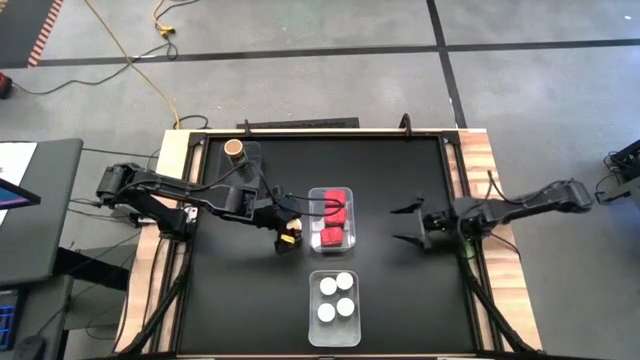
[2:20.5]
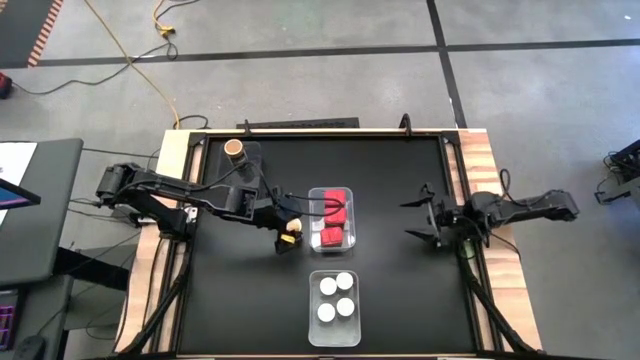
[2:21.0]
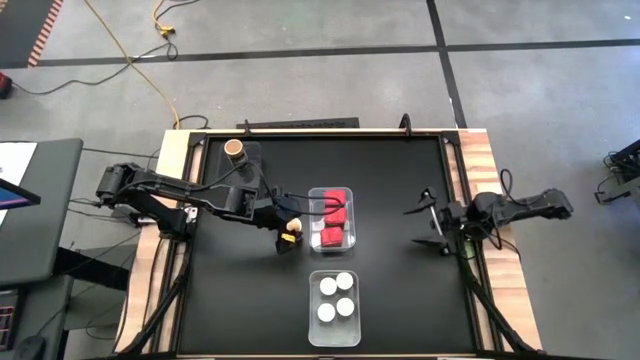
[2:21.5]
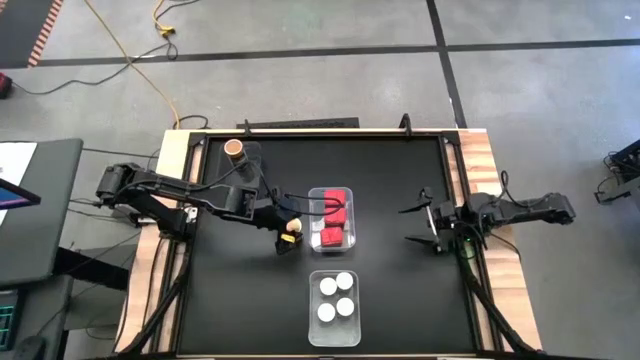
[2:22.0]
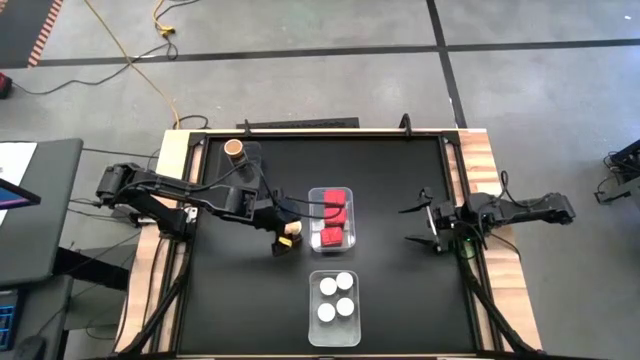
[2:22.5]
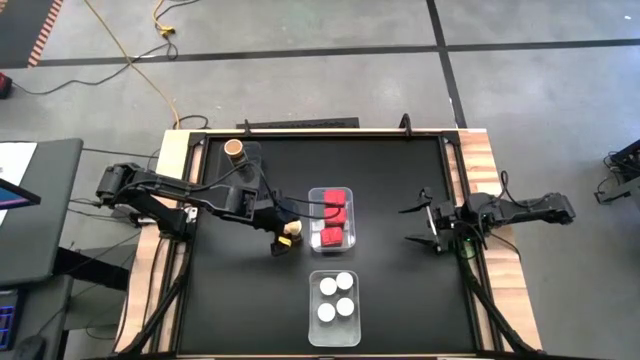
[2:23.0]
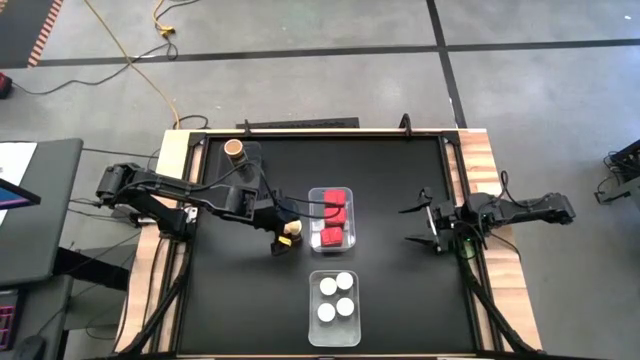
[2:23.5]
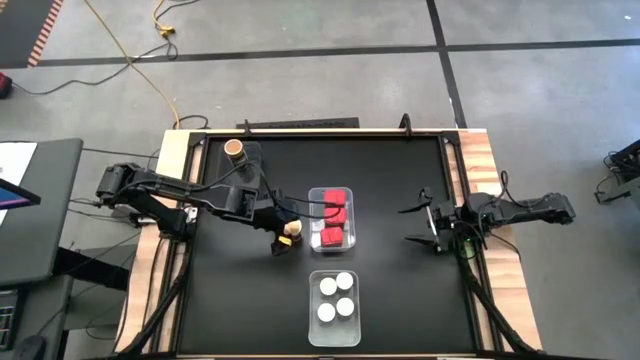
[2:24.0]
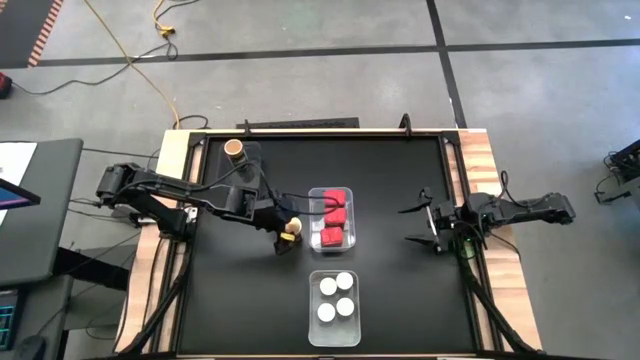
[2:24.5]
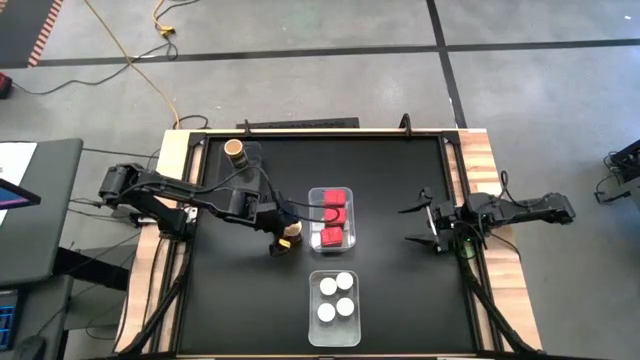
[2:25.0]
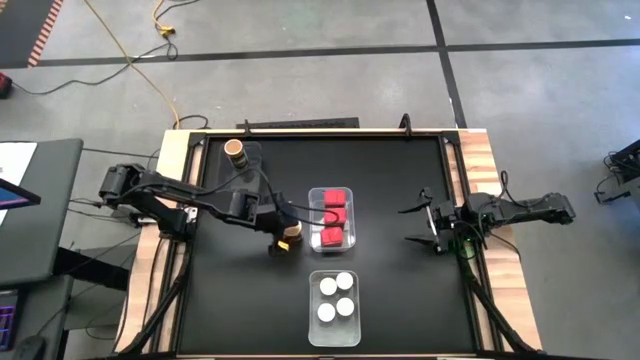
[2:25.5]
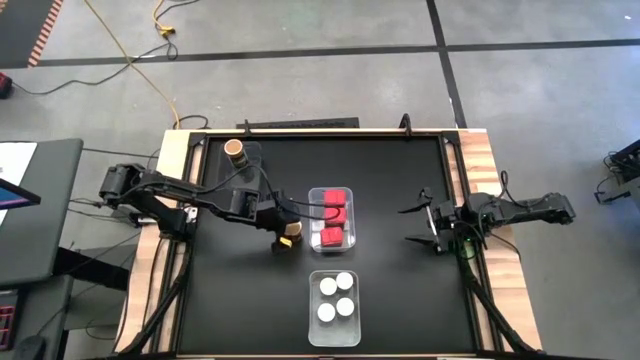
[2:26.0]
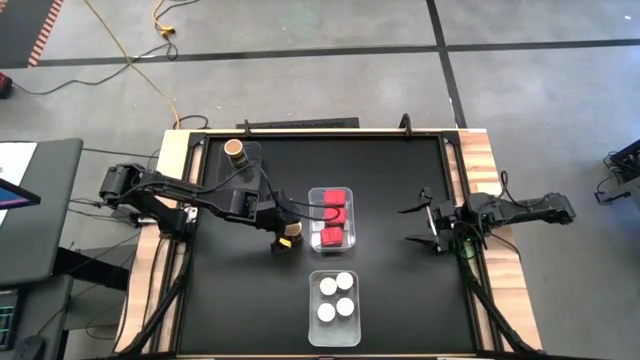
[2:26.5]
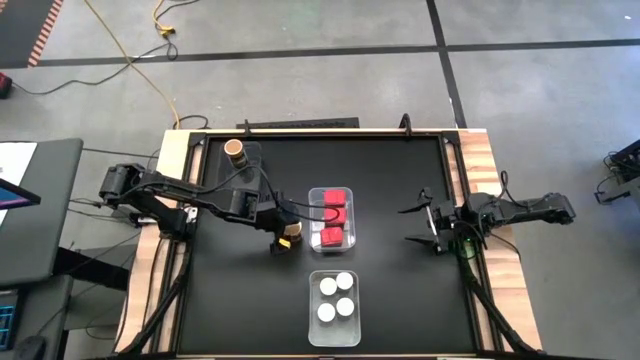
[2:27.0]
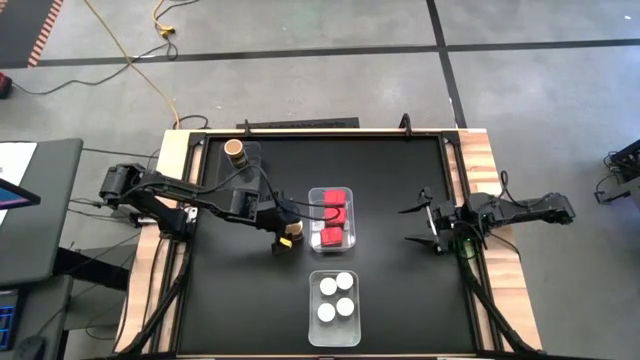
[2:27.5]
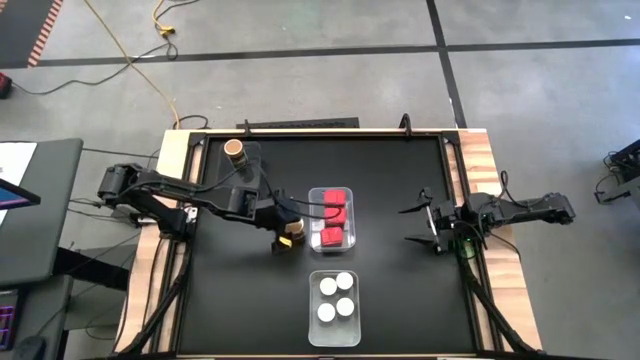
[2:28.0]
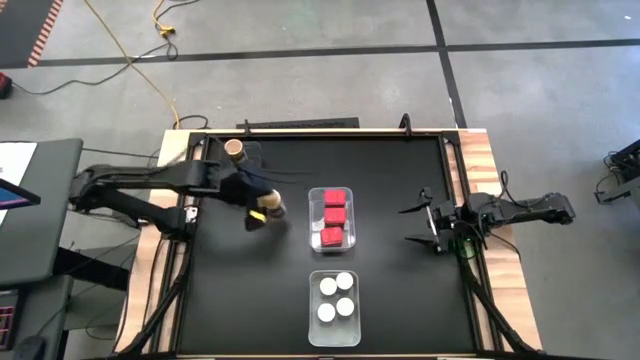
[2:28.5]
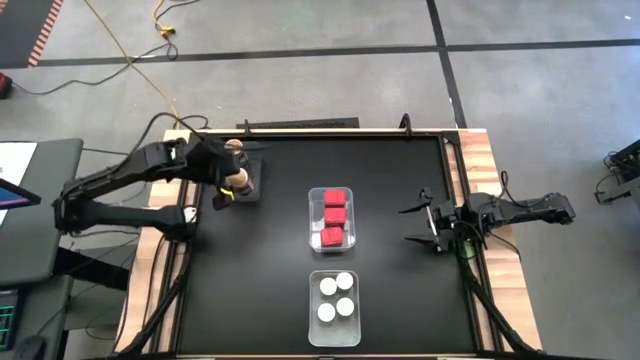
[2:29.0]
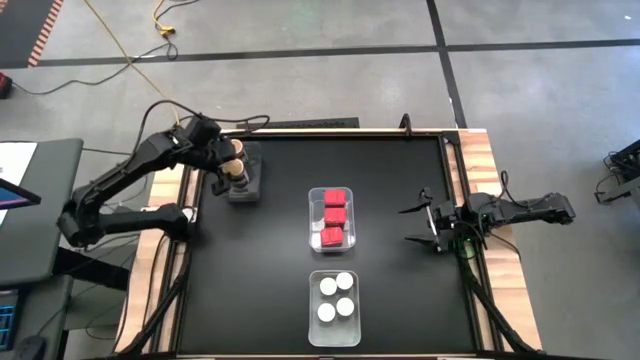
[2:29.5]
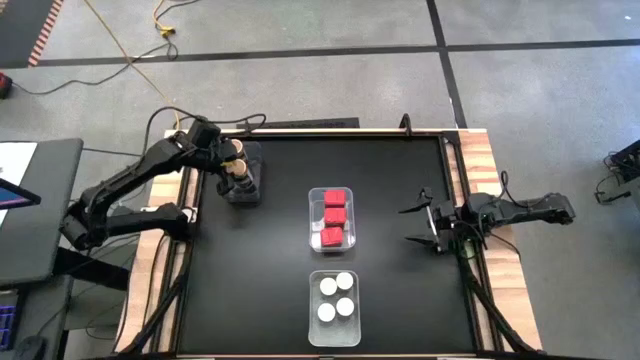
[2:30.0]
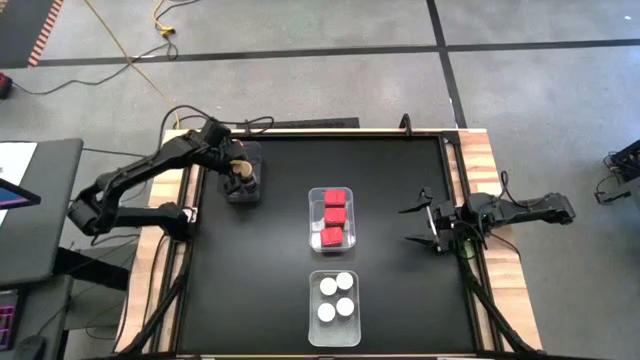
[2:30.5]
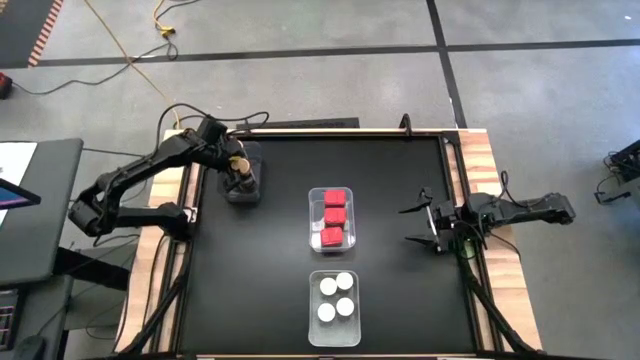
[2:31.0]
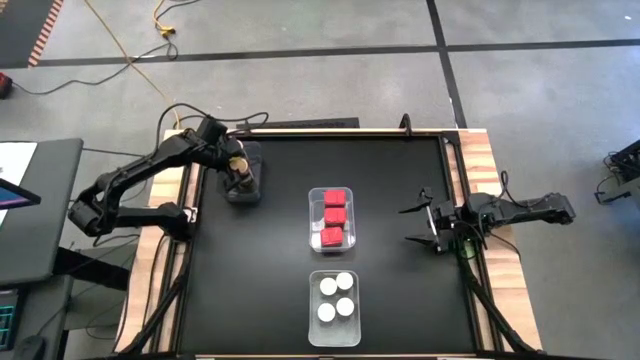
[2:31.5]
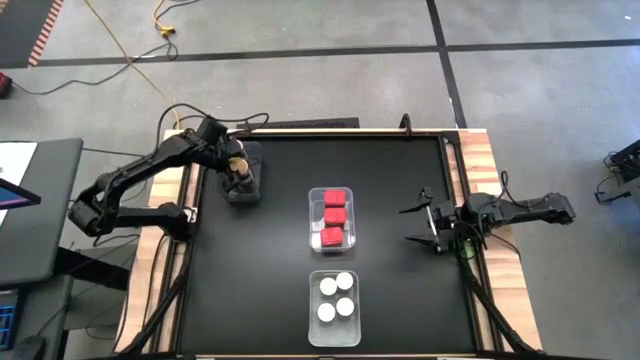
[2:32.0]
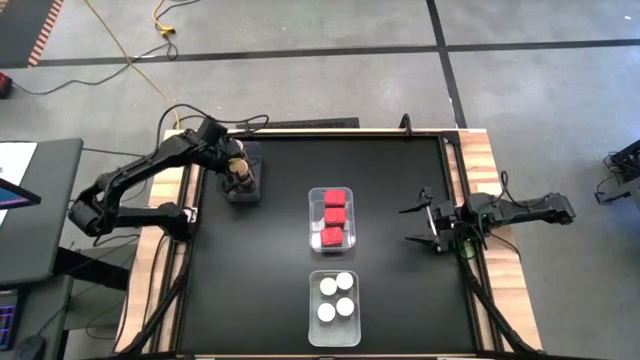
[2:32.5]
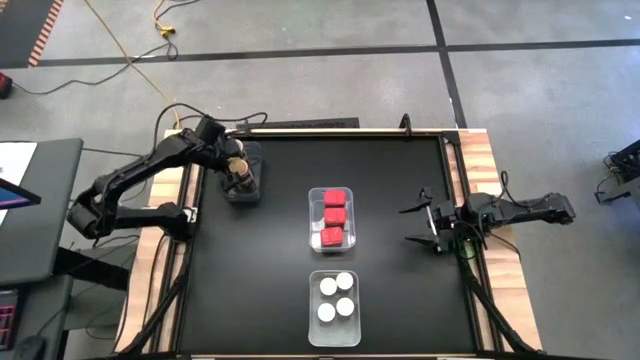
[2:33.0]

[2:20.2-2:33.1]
Task: Sort spices by type
Put the gold seasoning bottle into the black bin

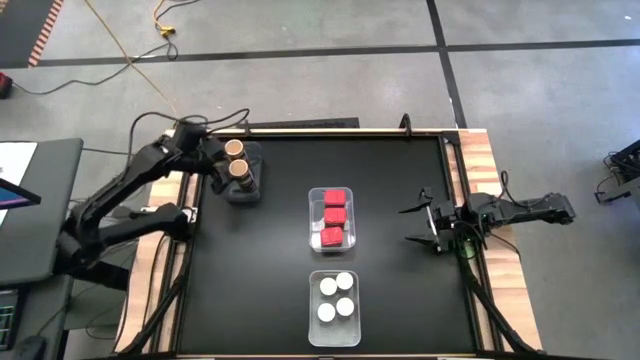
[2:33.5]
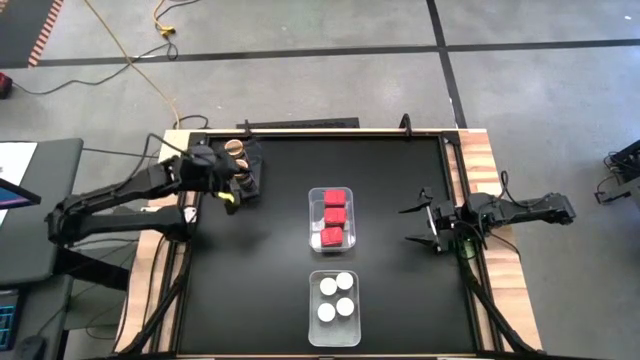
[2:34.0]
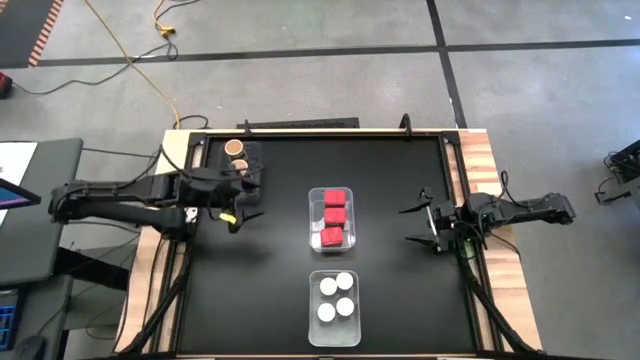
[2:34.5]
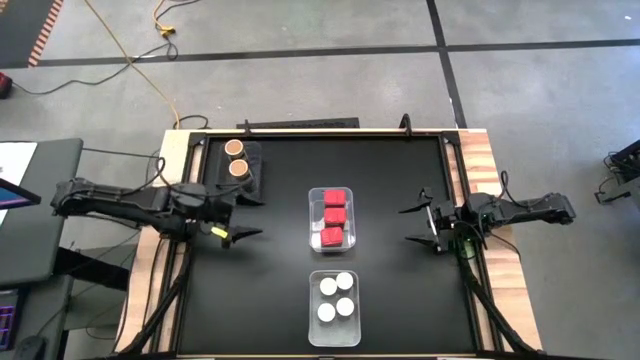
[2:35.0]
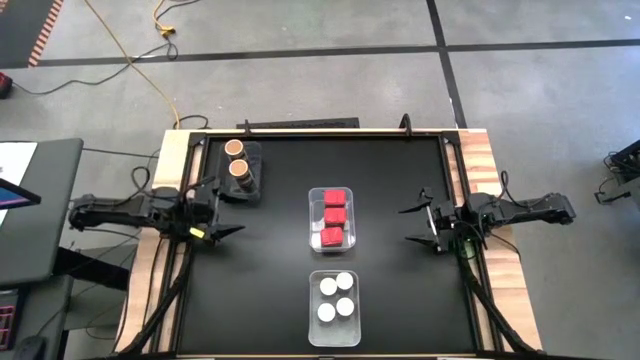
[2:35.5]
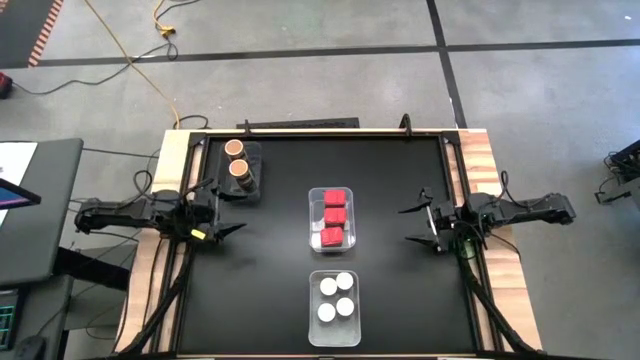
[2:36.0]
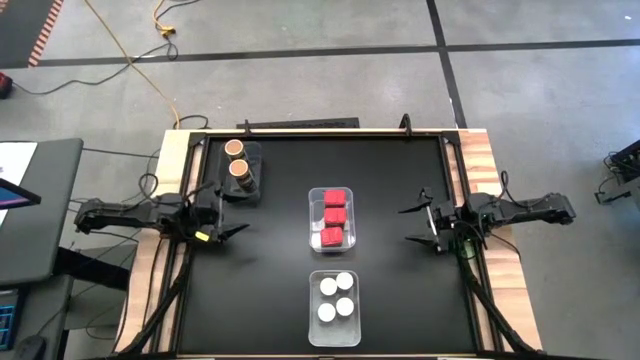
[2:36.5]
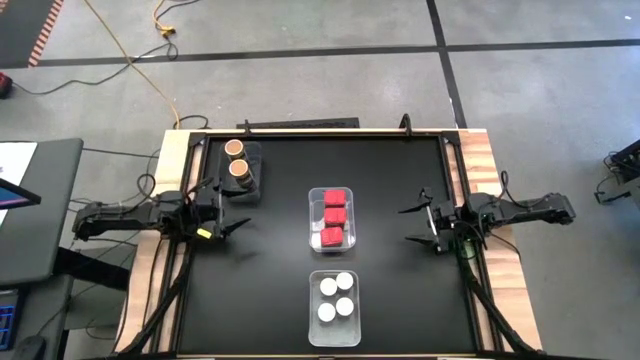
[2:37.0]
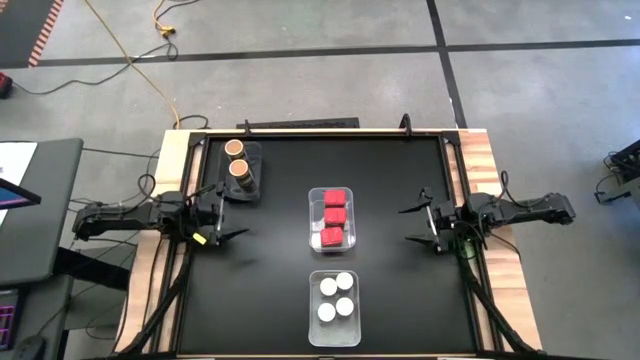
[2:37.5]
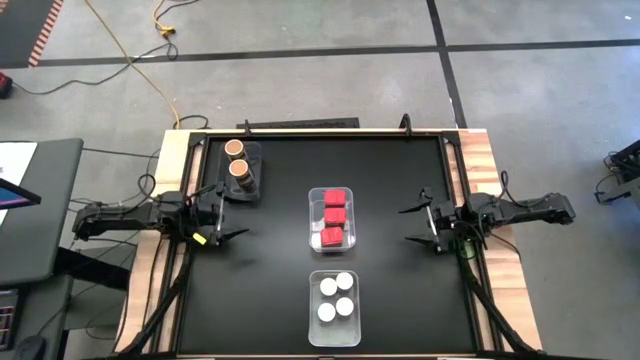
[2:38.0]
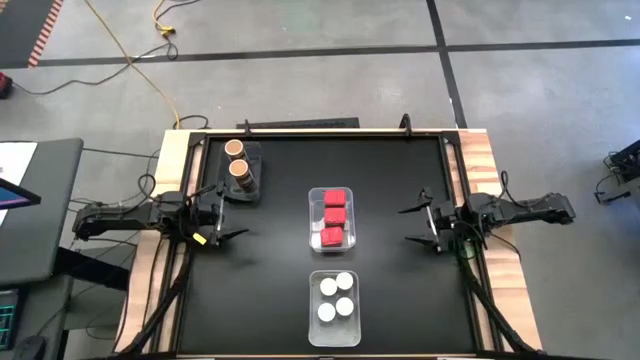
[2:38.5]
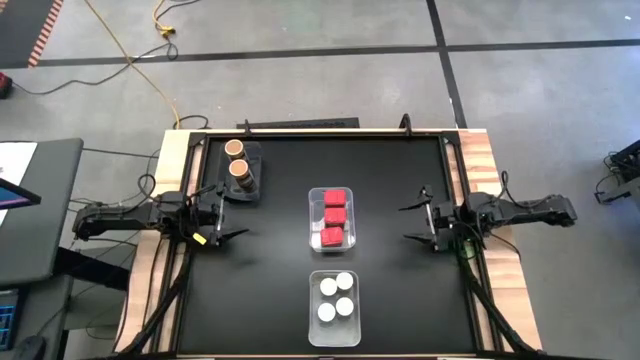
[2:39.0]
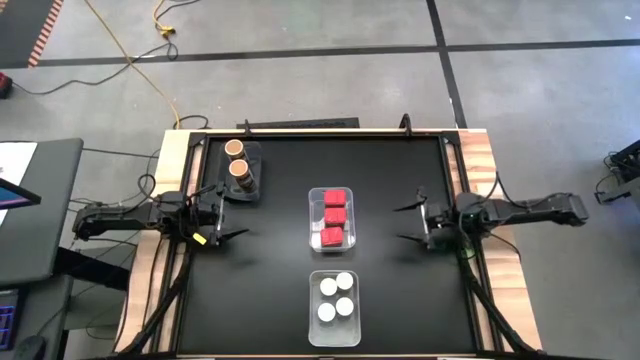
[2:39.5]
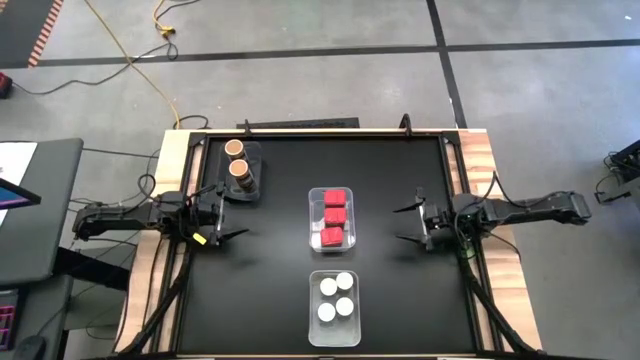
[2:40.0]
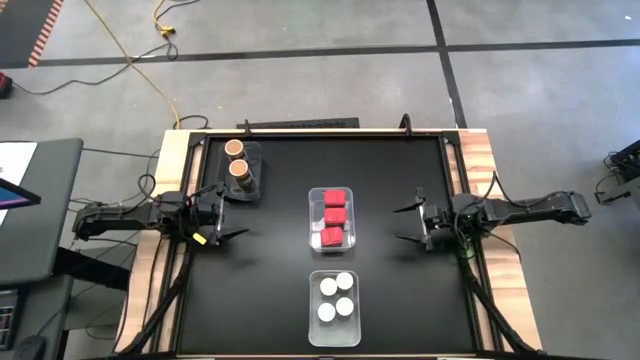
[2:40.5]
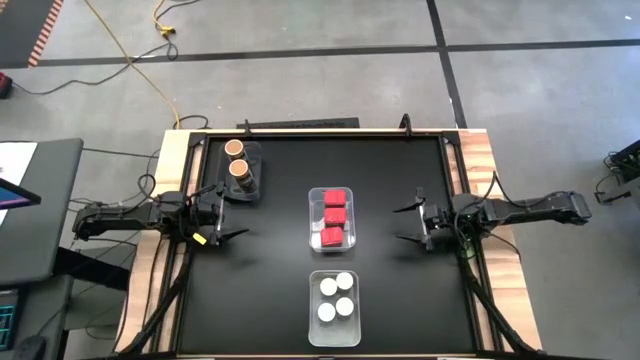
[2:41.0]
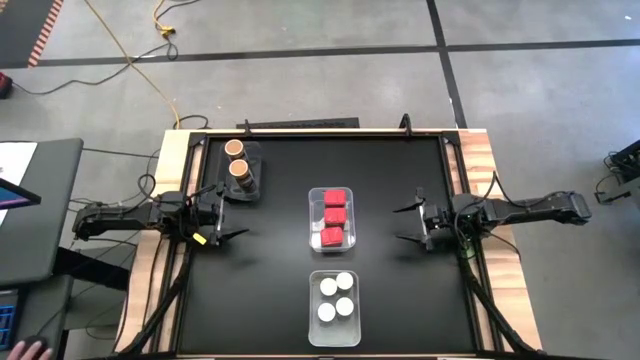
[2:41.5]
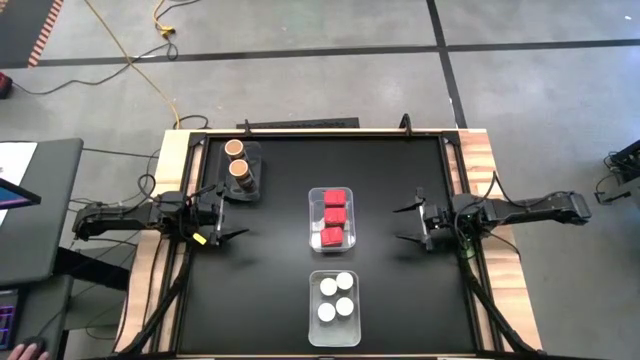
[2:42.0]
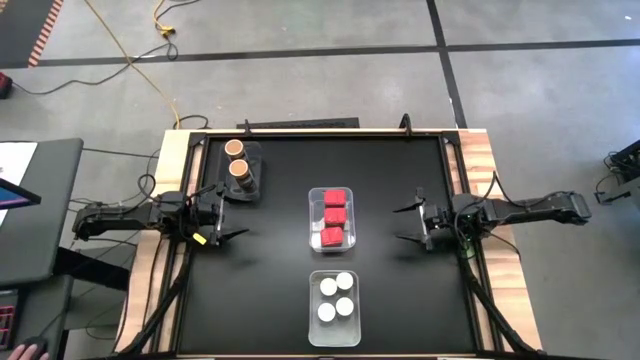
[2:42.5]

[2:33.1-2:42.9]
Return to Home Position
